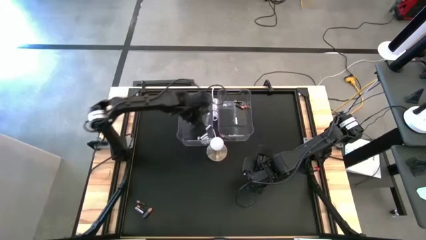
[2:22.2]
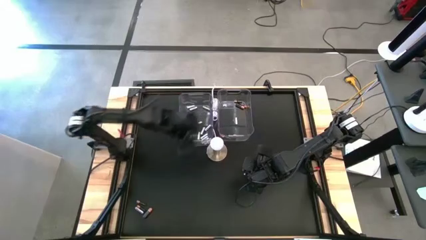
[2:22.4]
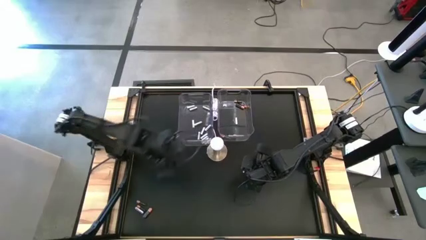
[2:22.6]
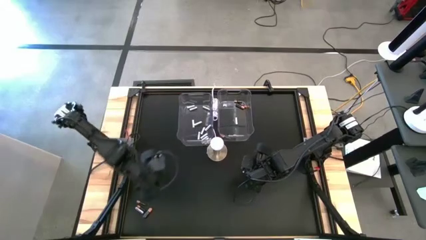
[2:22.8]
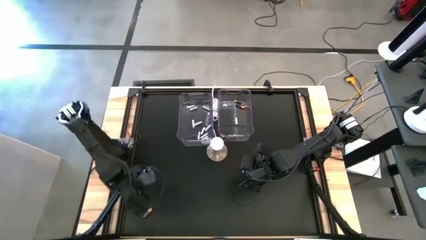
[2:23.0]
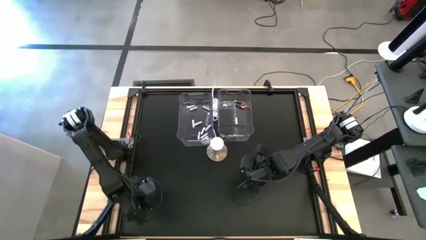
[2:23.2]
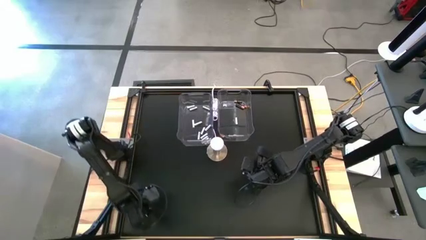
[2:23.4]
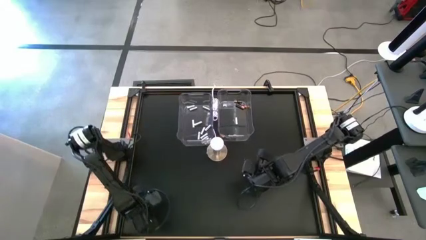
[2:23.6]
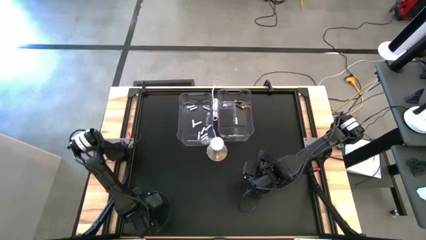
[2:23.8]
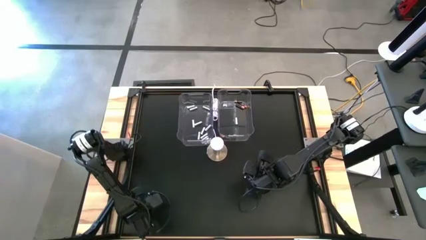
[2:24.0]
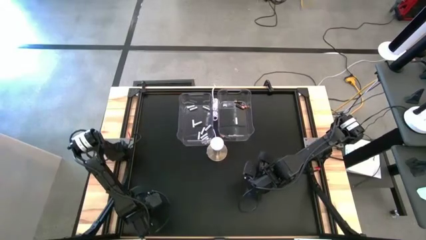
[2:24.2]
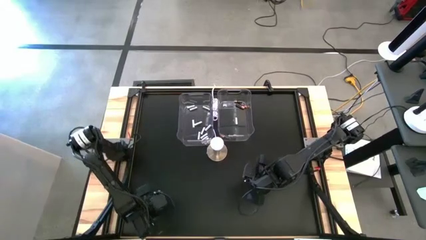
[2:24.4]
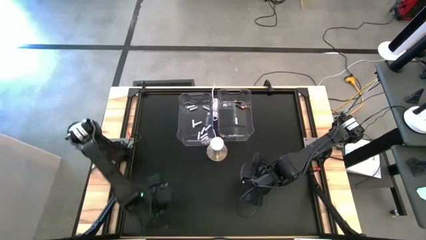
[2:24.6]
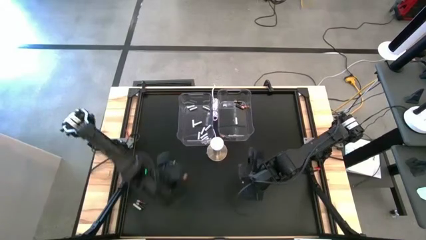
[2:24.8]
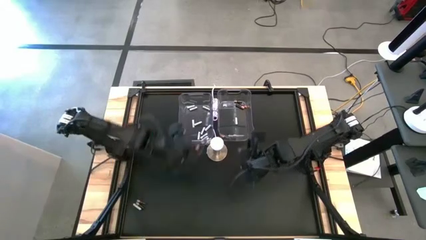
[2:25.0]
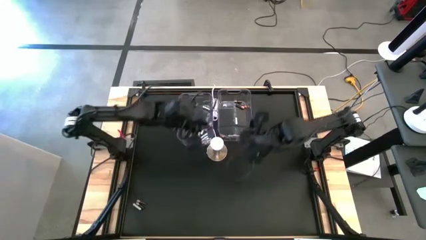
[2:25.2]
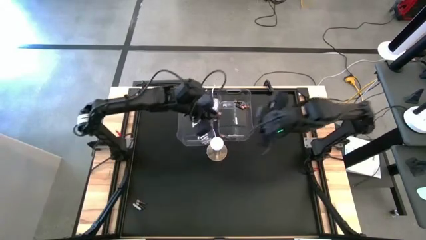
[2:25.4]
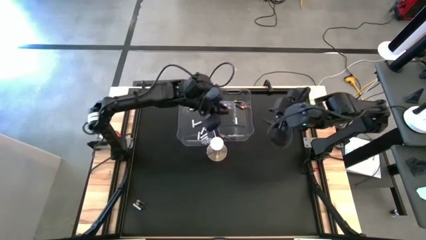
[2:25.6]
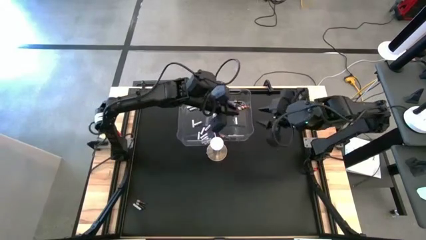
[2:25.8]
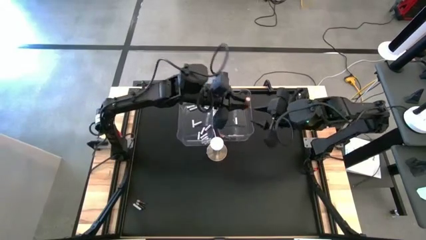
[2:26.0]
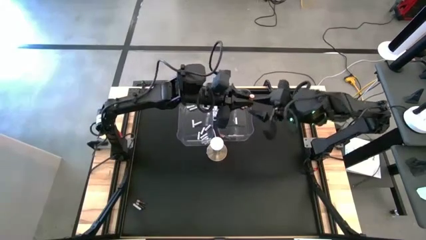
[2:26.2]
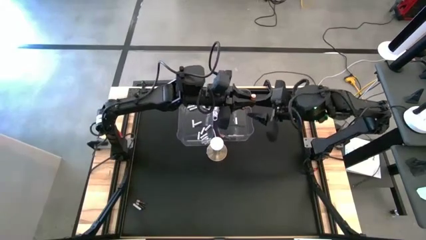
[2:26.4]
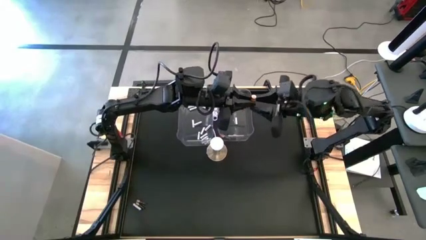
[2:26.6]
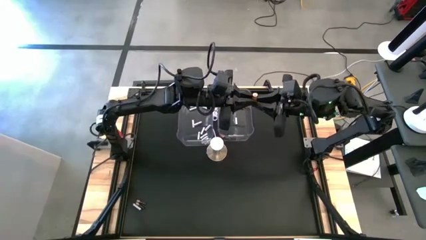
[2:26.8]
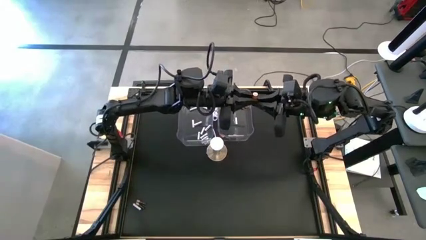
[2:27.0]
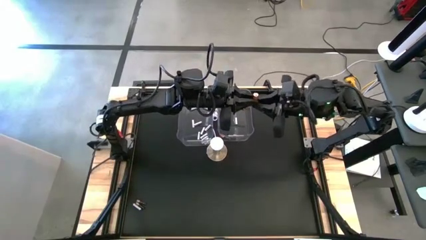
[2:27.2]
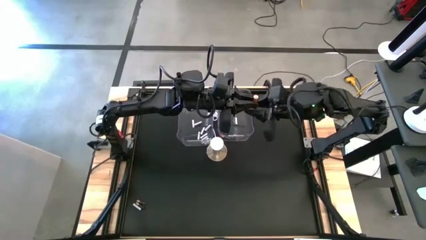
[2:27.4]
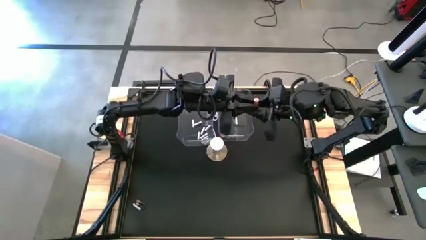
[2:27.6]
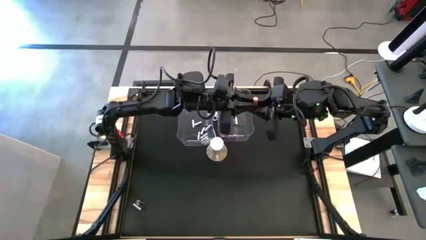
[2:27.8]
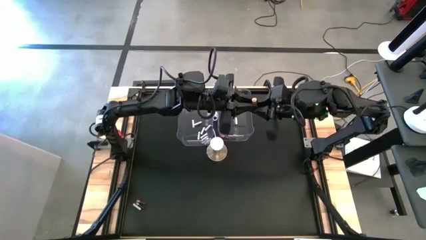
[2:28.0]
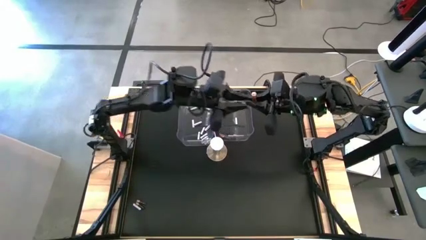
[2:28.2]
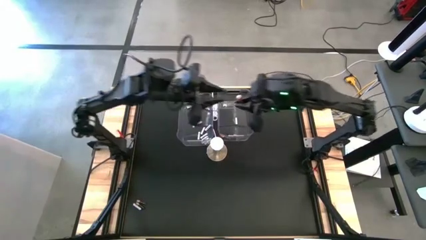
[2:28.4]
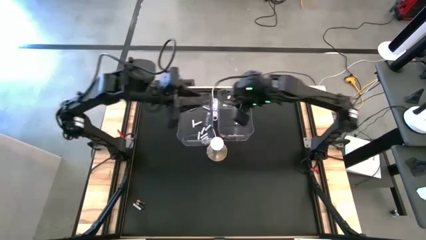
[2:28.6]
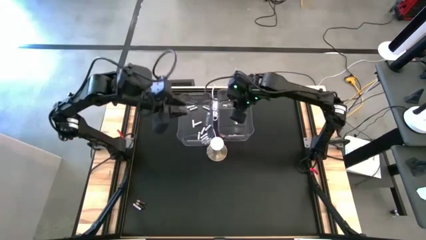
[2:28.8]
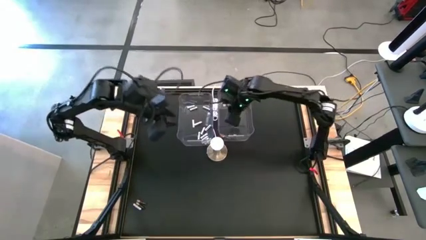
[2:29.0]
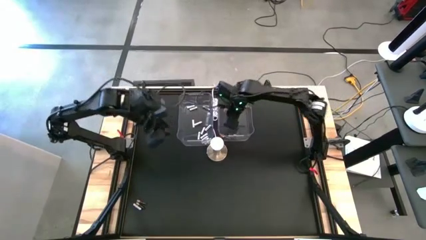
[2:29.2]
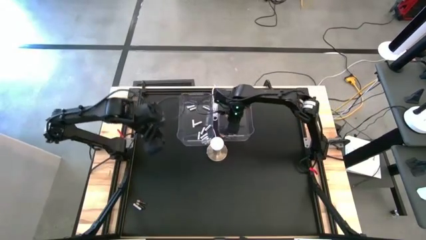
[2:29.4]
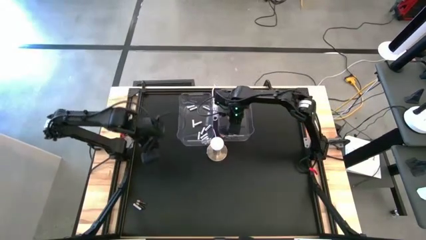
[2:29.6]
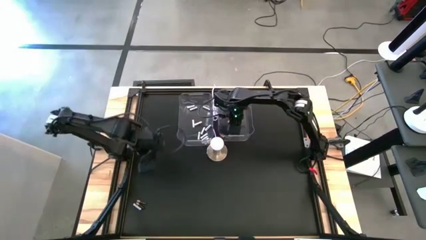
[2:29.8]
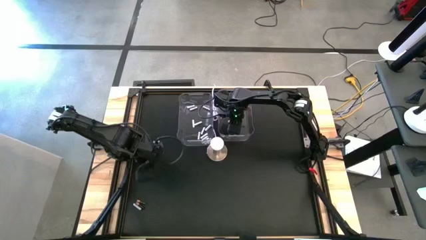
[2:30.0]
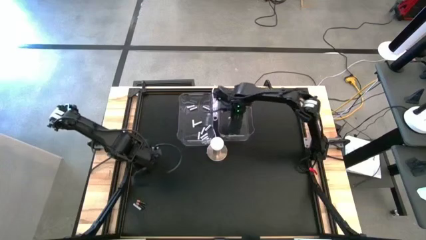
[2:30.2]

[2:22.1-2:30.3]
Task: Sort batteries
Put the black battery into the right transparent bin

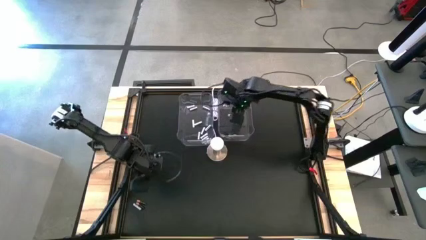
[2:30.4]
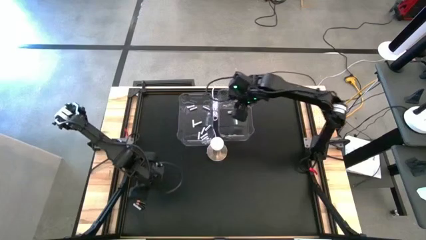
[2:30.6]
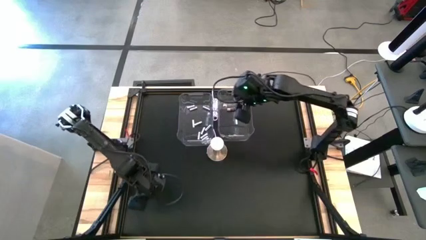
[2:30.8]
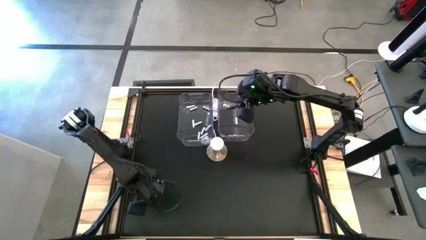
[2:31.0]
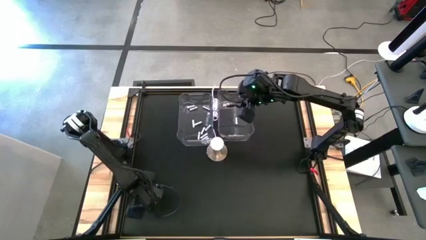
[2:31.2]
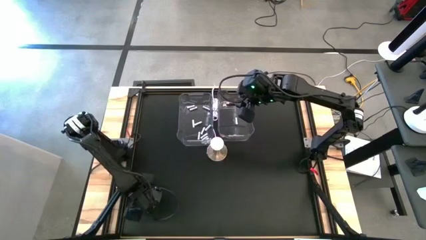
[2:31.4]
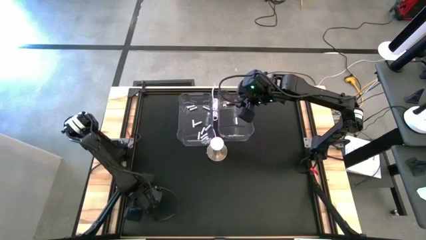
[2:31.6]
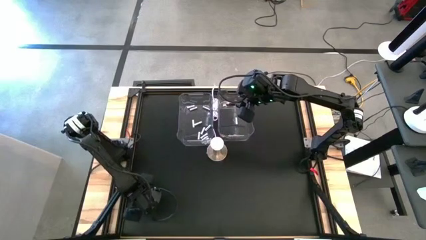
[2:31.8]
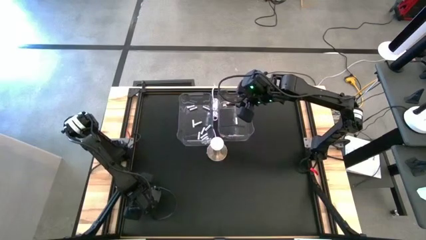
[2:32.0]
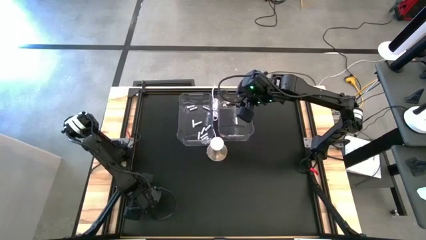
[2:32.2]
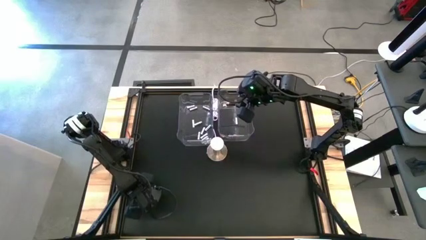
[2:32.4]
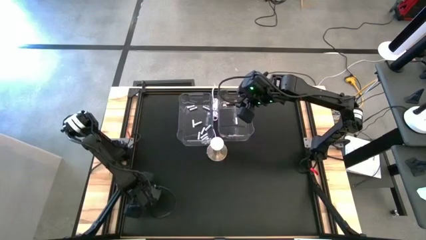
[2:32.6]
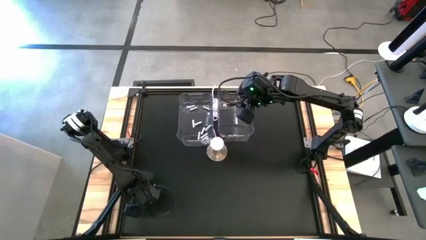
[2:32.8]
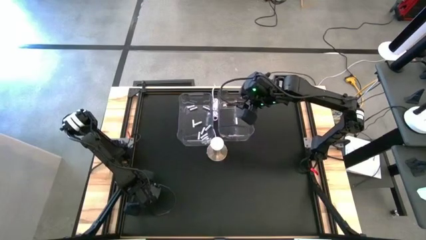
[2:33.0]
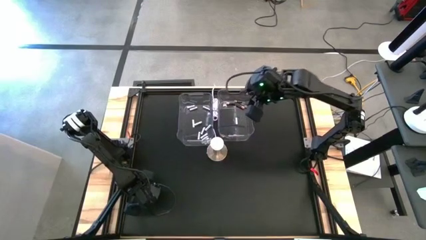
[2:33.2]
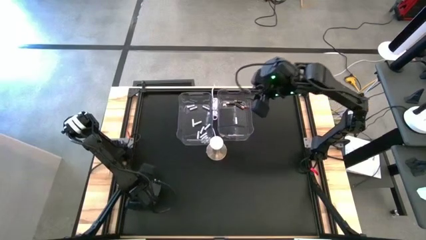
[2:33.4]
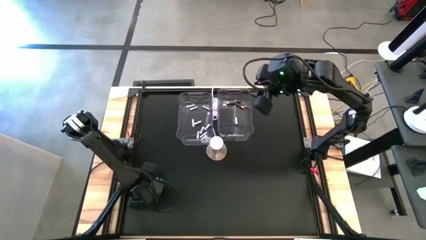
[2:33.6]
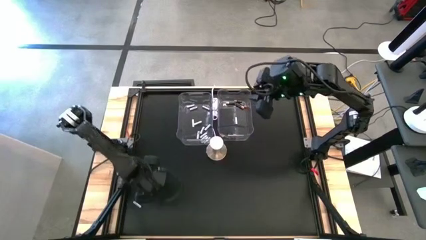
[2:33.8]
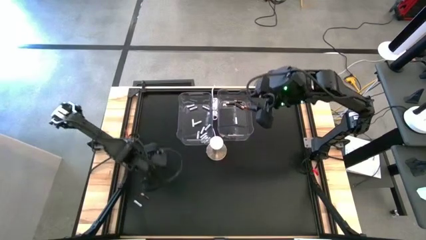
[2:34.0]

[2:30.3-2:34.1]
Put the black battery into the right transparent bin

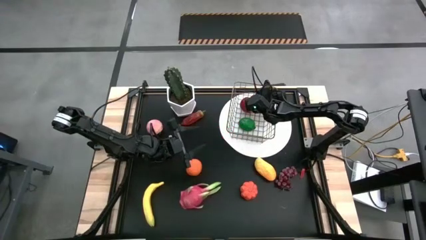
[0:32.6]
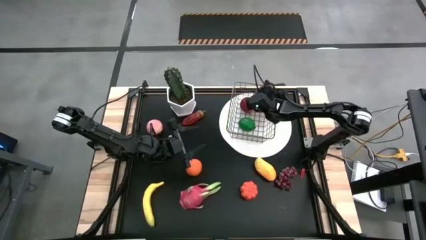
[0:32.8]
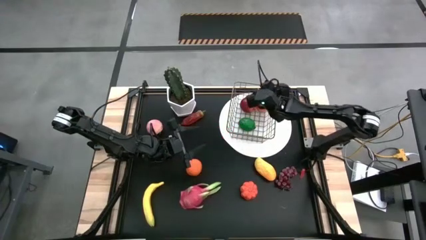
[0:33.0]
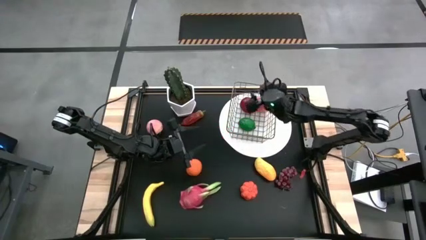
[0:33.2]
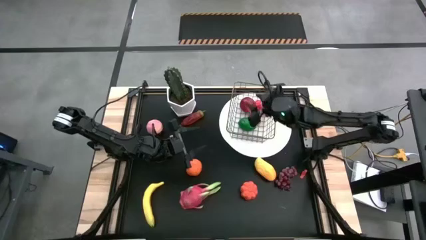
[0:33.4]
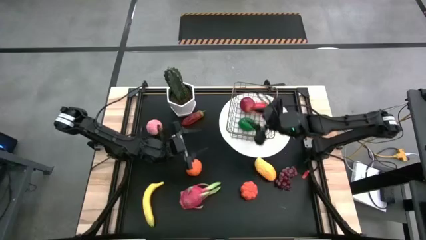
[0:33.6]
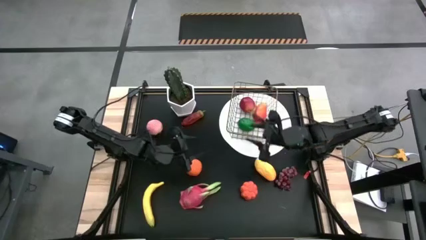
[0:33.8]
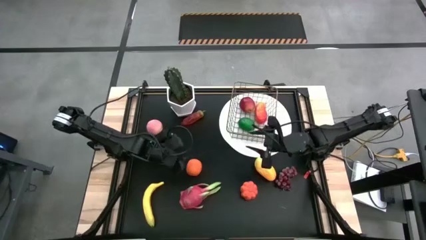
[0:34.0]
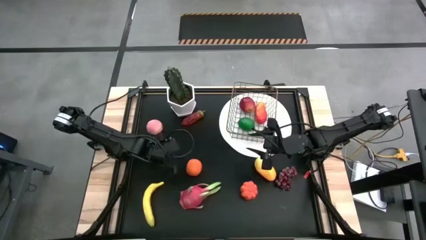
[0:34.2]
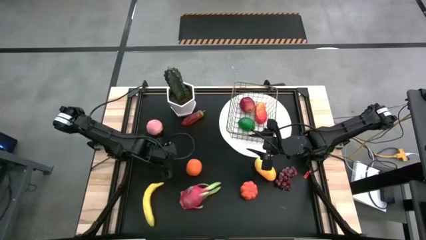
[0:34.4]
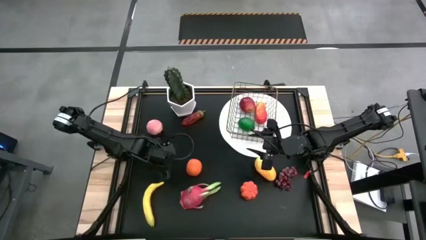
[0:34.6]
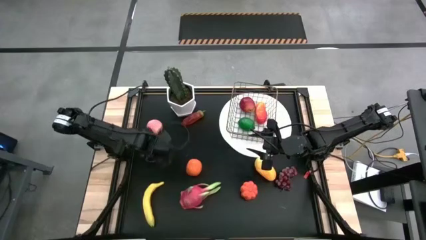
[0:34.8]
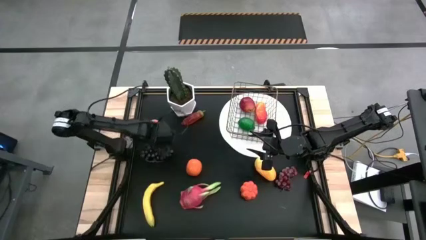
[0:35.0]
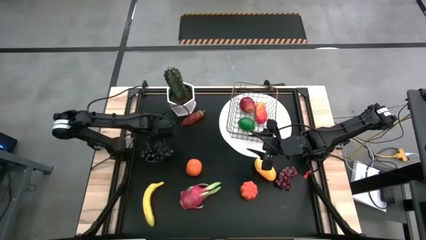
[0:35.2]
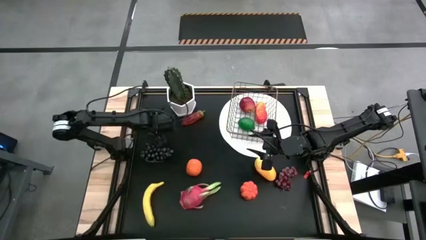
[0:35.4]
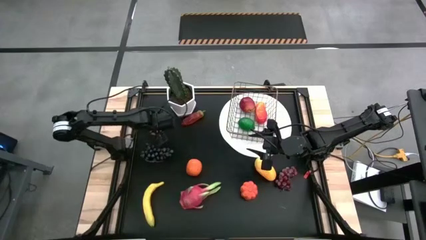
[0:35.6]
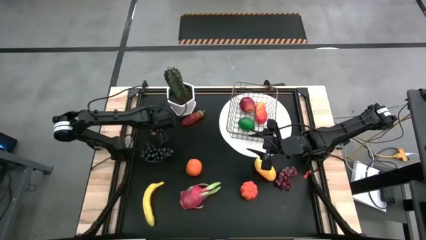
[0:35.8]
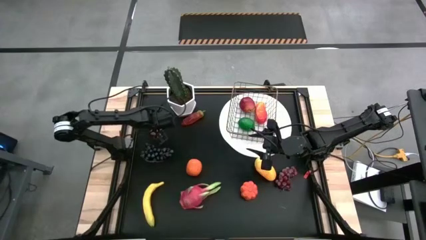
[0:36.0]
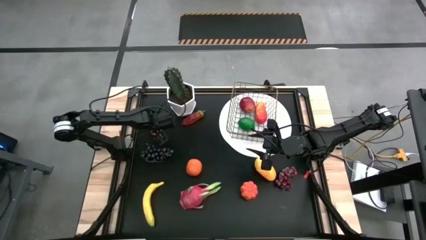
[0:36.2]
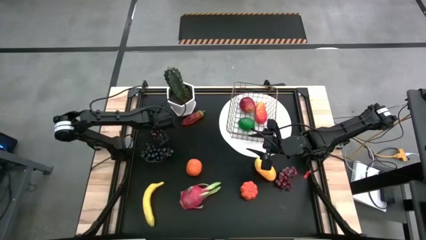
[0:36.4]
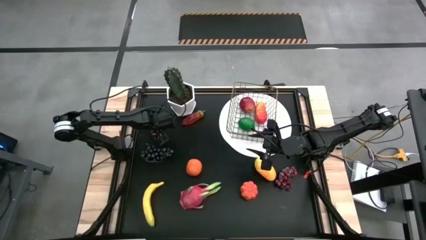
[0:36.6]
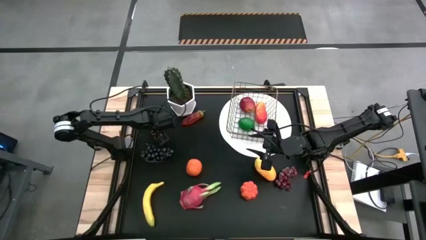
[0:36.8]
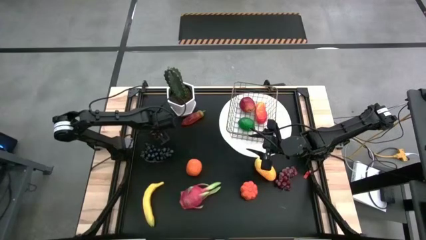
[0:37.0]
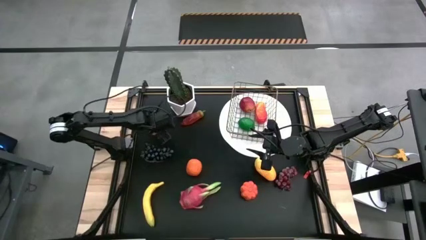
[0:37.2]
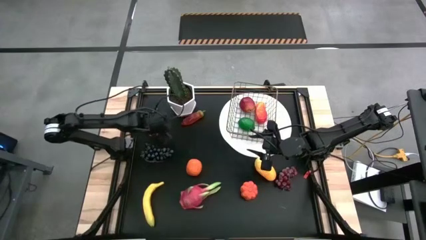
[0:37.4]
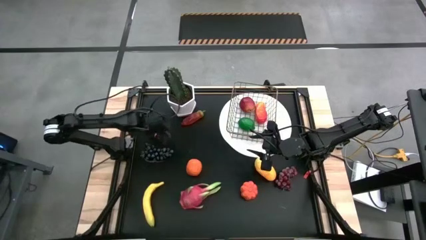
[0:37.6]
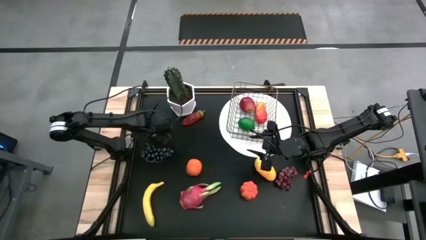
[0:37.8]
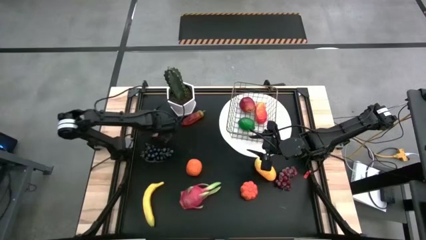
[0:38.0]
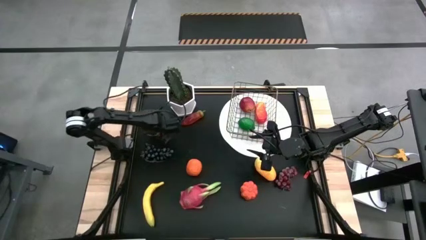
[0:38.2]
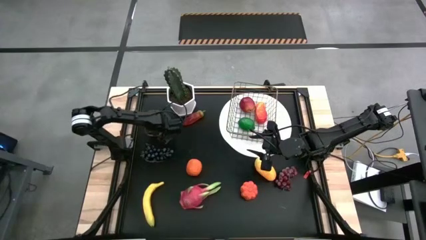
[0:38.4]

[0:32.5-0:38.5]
Task: Build produce basket
Put the peach into the wire basket
